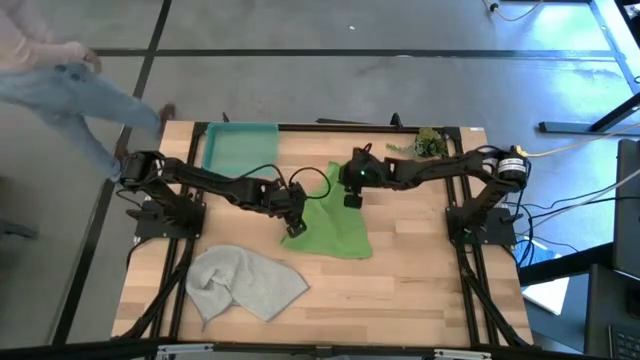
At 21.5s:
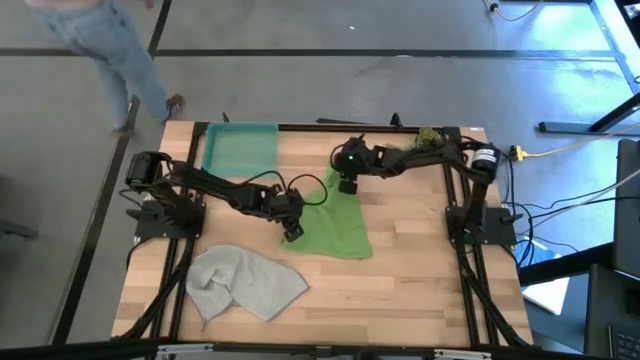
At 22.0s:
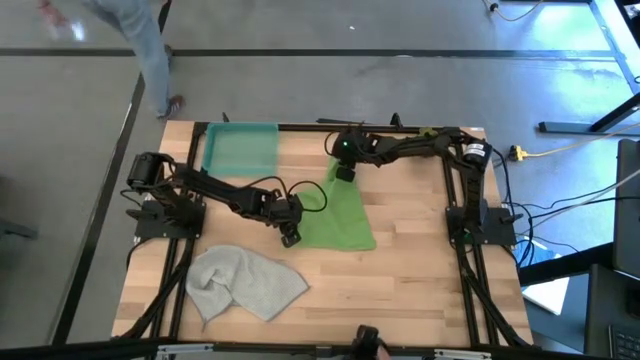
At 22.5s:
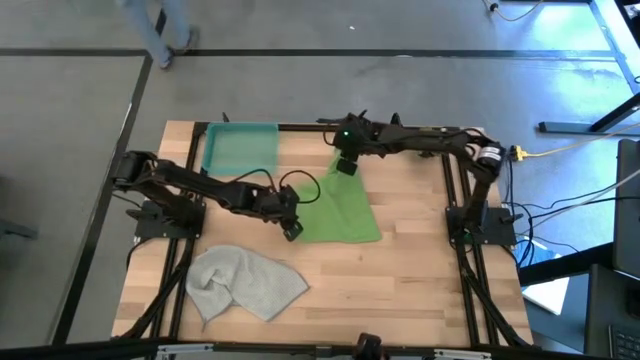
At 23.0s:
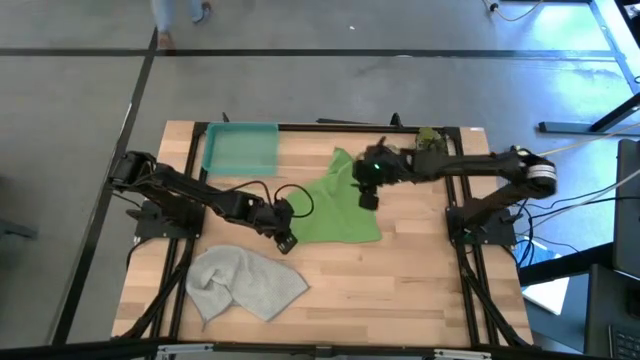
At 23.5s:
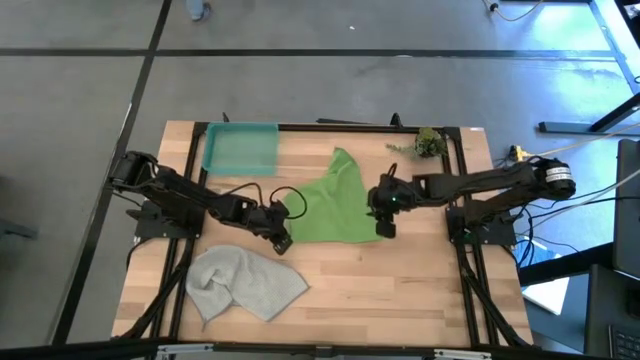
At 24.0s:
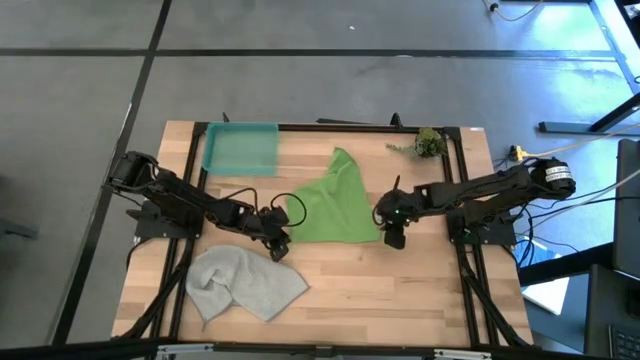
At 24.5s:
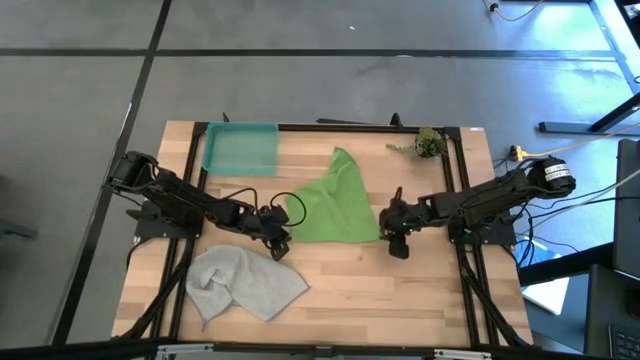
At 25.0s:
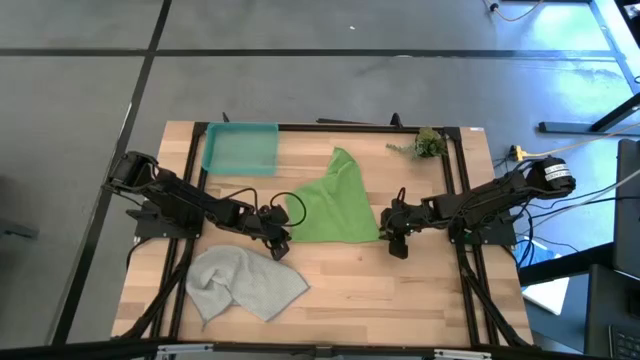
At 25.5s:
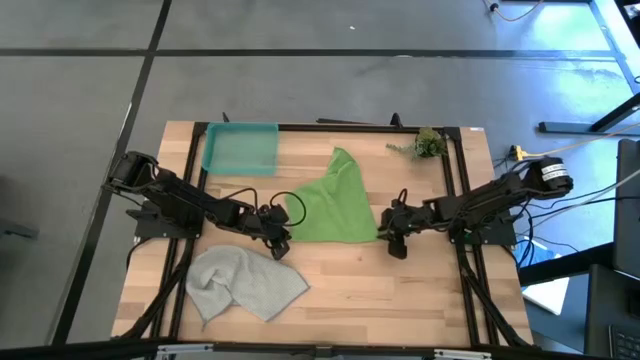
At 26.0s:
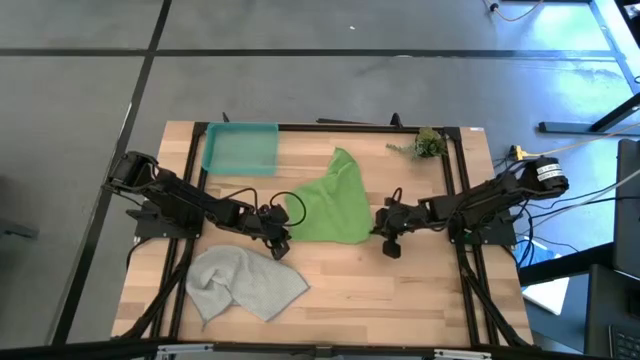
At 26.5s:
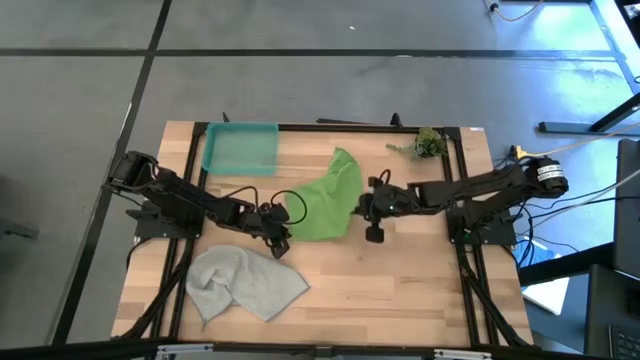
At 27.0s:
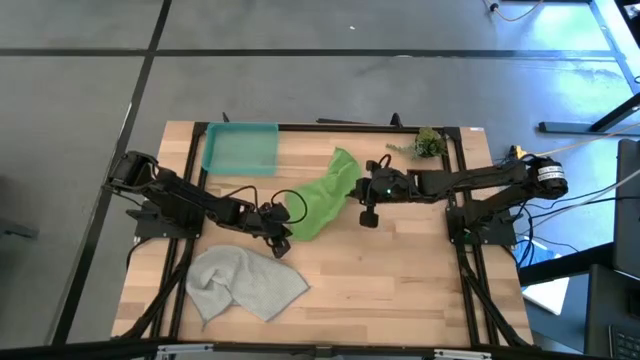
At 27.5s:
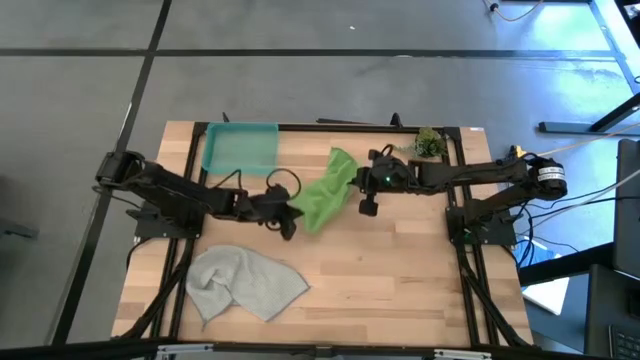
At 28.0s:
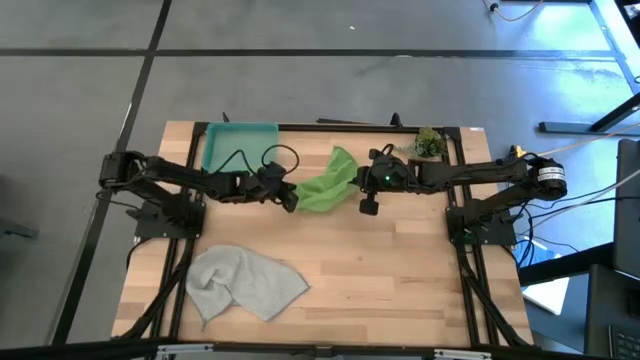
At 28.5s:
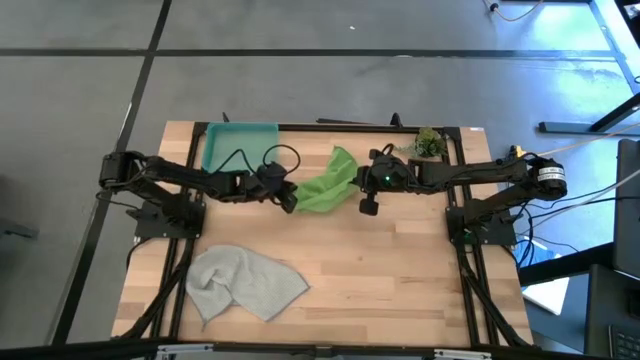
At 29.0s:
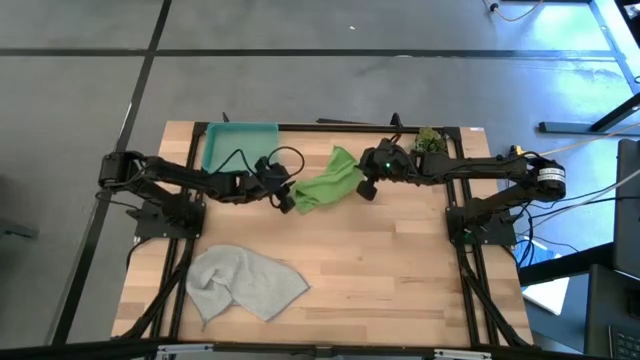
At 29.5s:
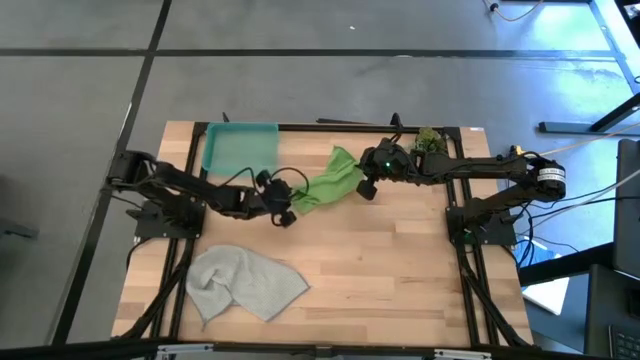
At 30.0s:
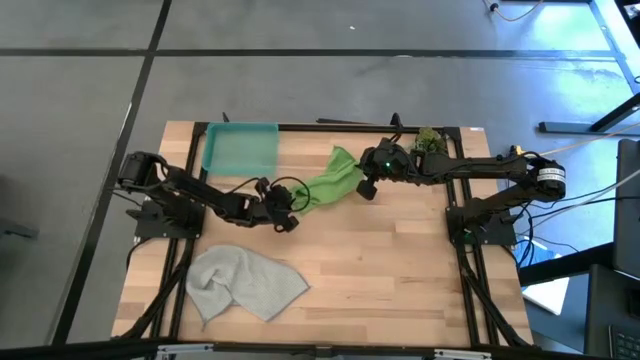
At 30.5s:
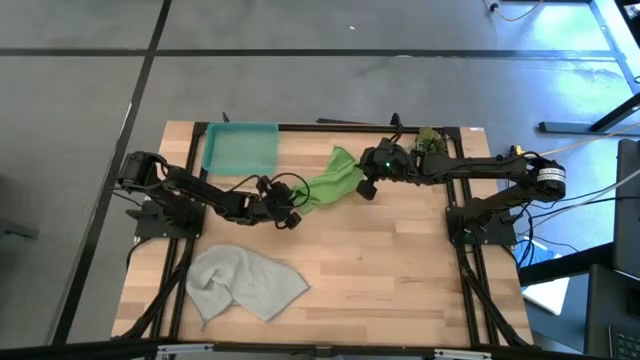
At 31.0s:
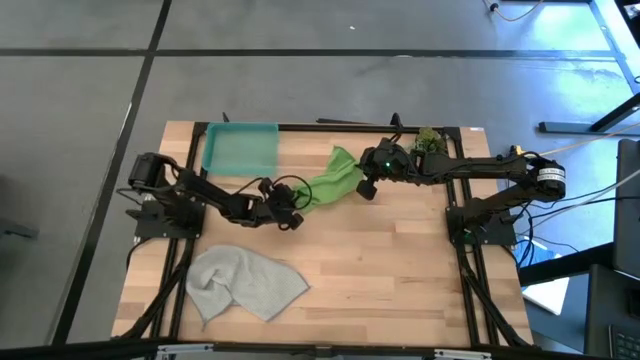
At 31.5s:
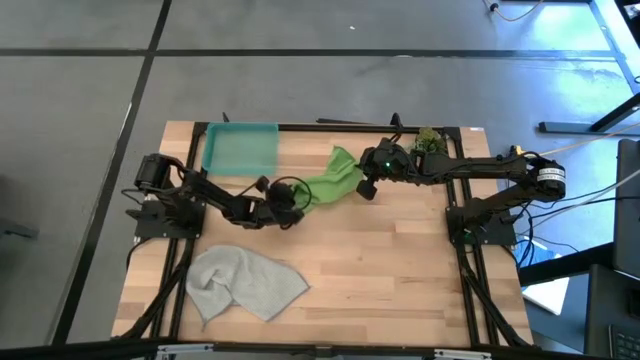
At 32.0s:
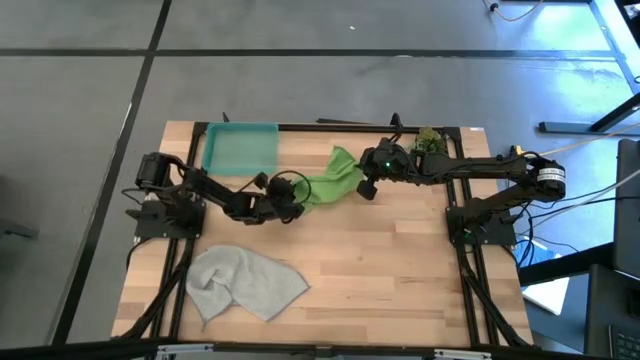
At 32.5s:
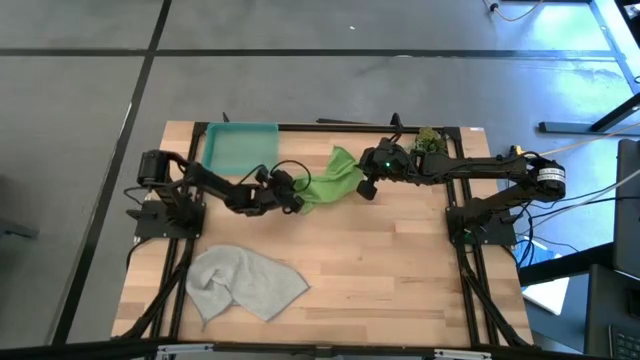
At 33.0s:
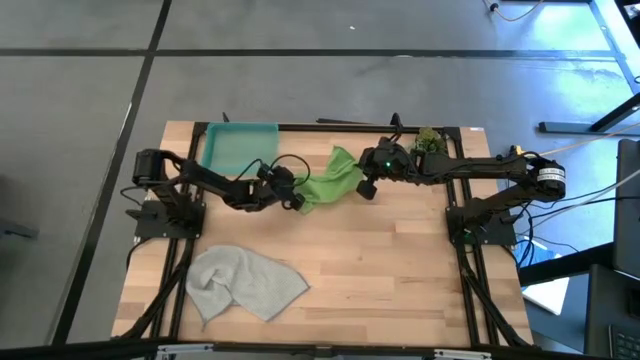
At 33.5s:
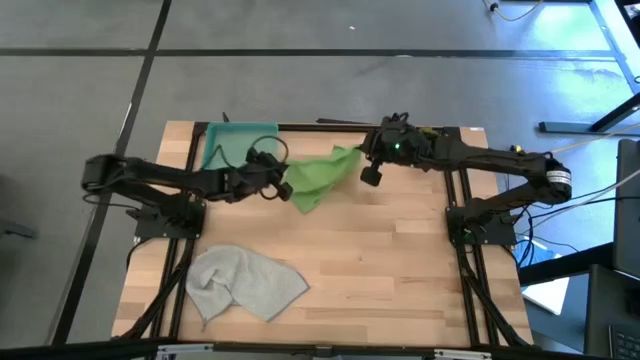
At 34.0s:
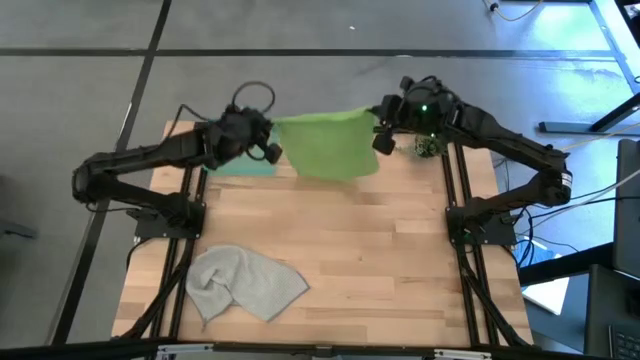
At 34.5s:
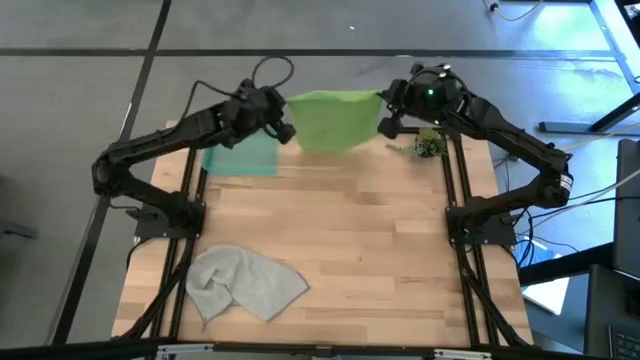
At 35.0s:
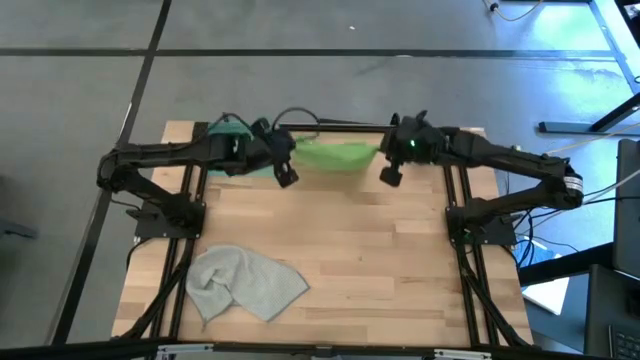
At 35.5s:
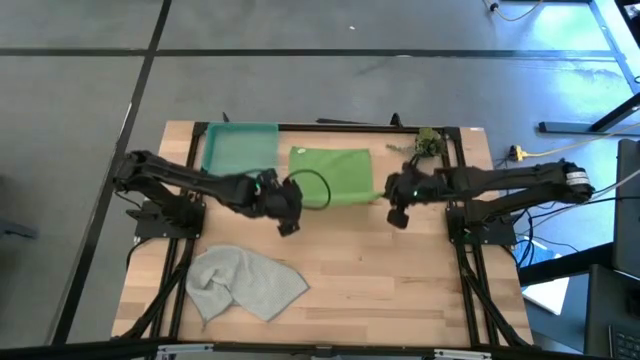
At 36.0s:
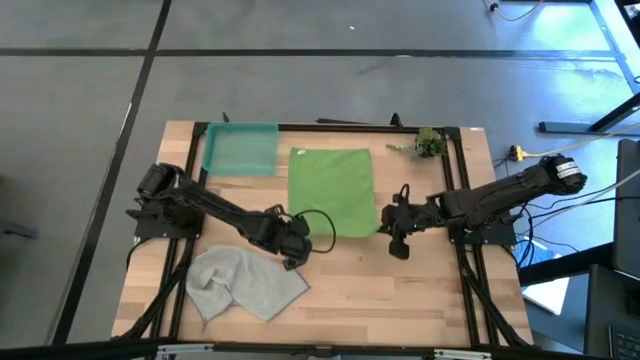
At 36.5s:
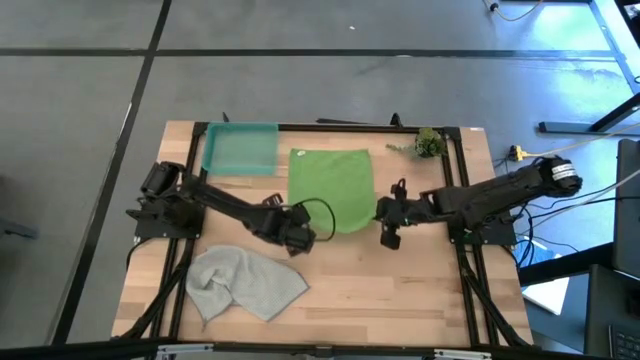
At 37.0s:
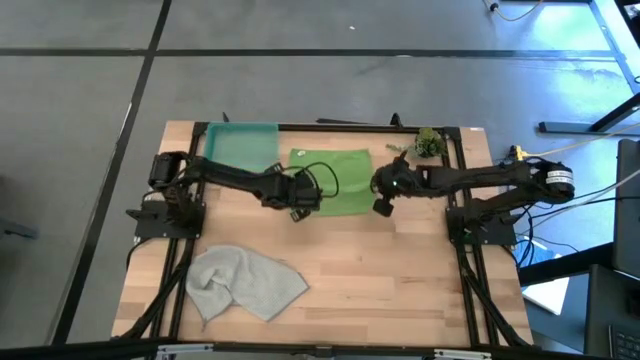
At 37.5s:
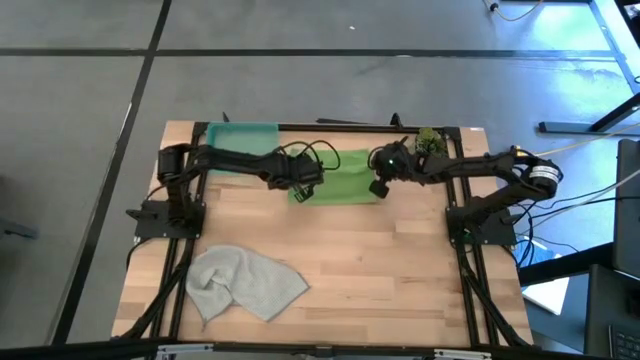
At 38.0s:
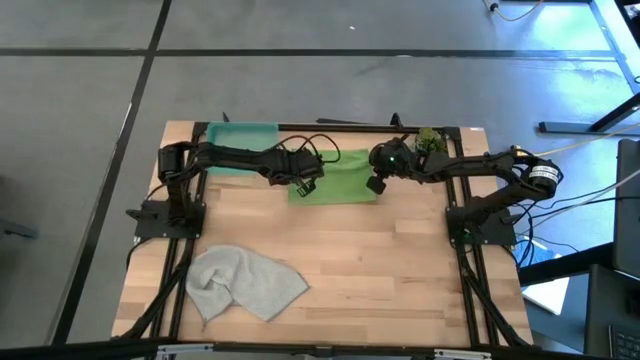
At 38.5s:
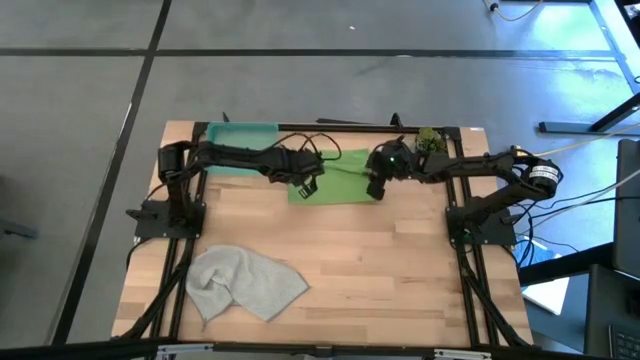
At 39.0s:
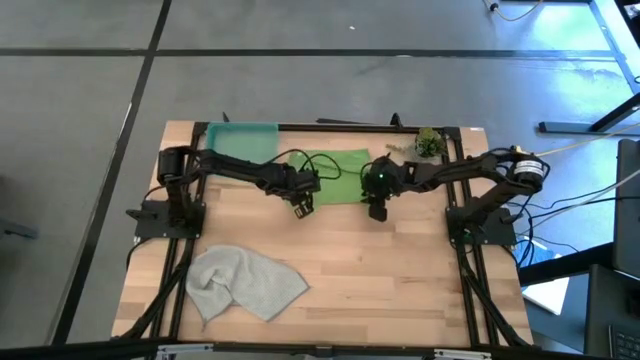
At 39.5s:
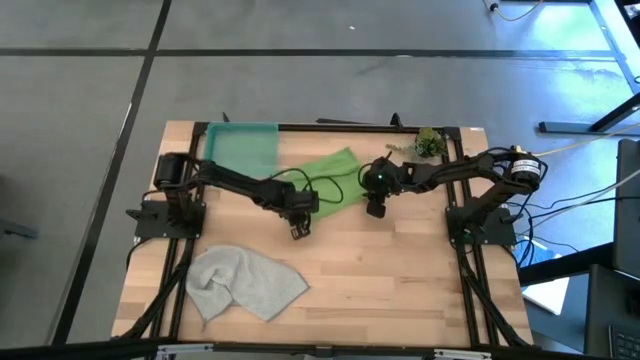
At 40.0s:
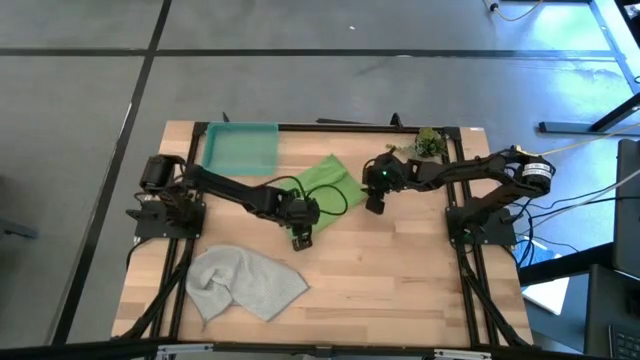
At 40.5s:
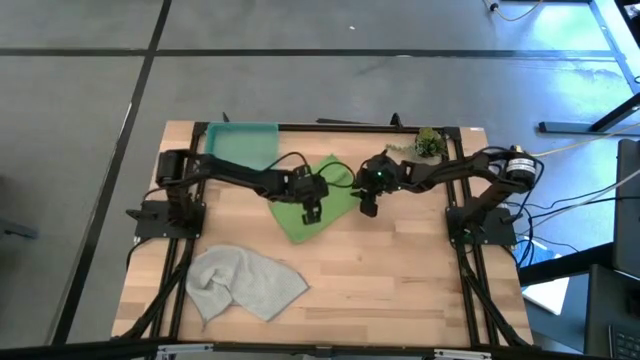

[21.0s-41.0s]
Task: Roll microfiber towels into tight, uniform cylinder then place into a basket
Roll the green towel
